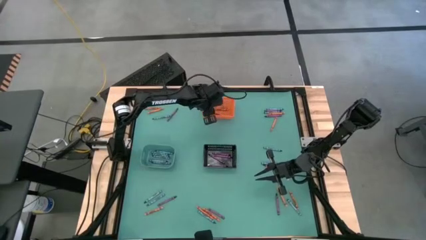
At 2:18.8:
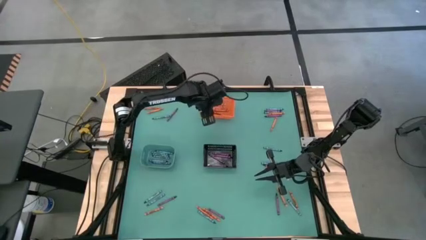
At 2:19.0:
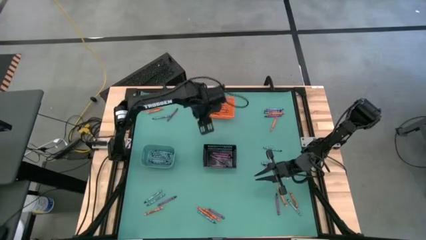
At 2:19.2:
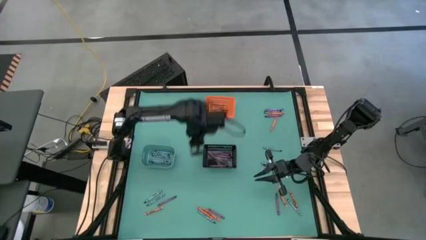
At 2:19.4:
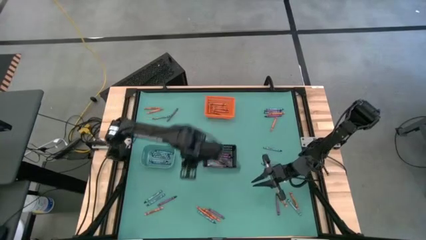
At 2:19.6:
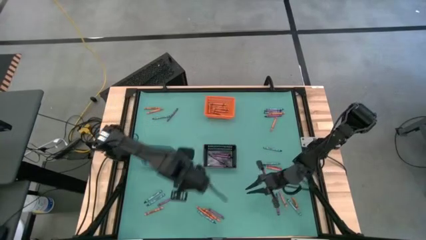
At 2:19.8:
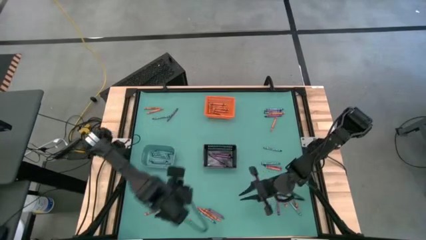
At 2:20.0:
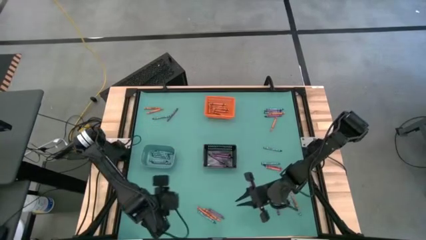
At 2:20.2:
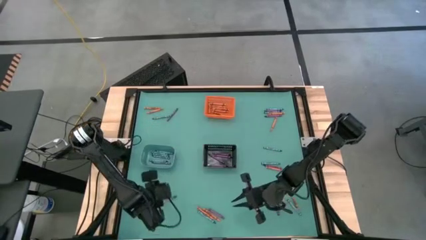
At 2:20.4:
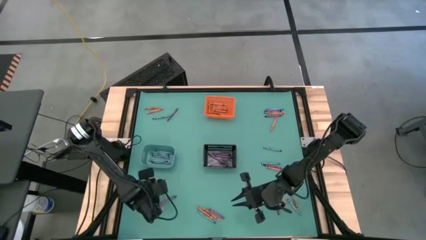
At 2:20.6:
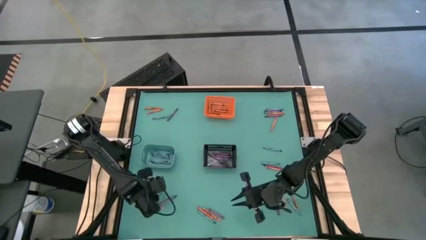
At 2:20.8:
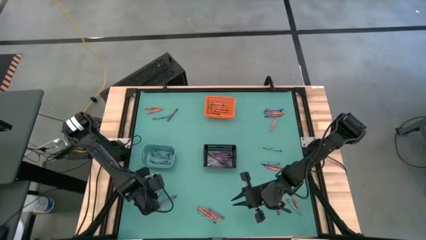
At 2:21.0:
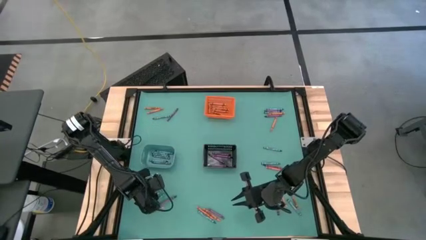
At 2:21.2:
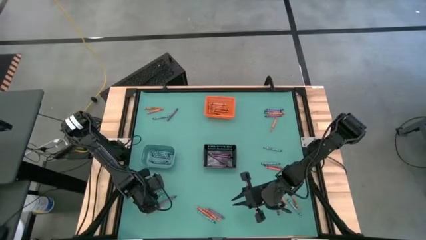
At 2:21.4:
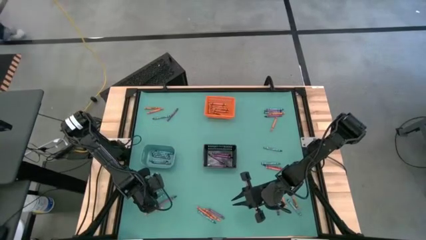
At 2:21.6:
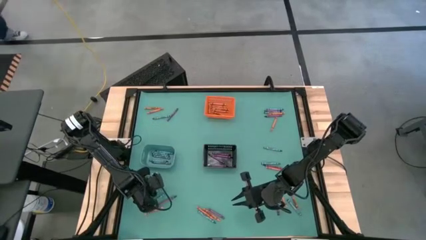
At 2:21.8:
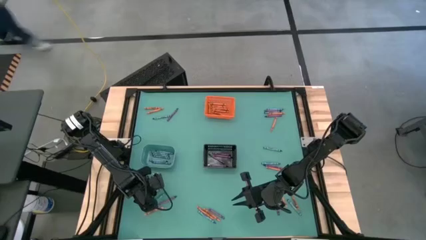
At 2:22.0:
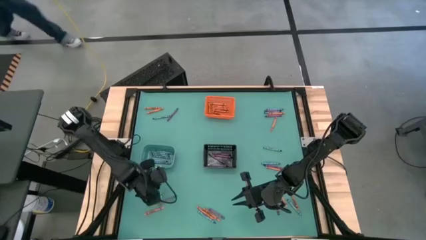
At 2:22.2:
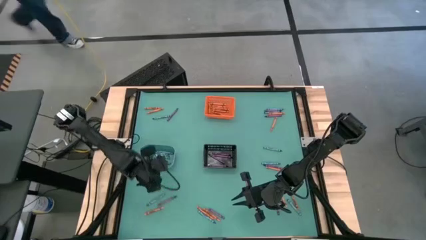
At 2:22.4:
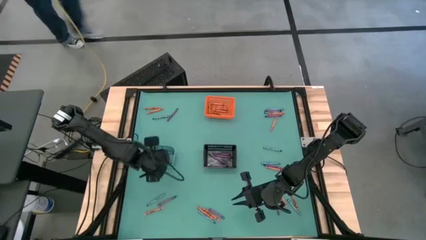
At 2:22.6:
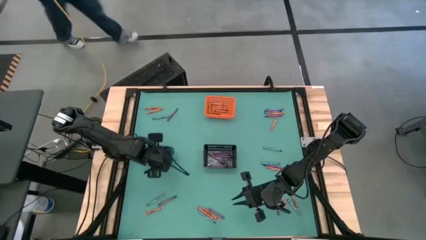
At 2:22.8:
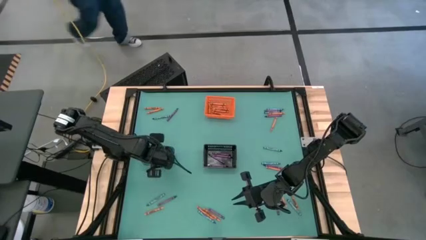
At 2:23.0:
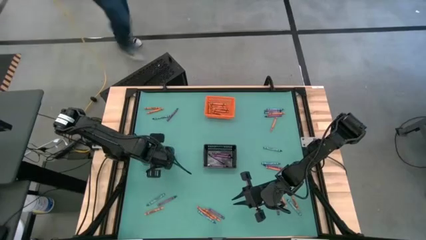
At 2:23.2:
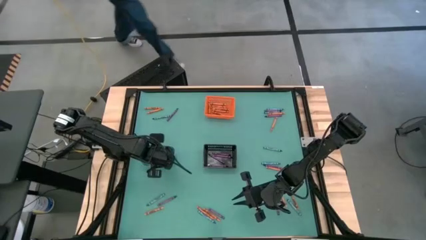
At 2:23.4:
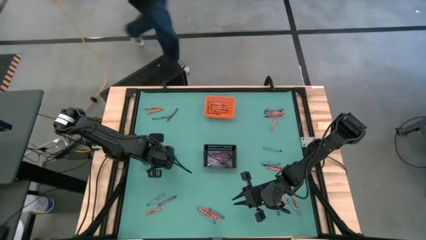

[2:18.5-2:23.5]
Task: Sort crayons
Put the blue crayon into the light blue bin

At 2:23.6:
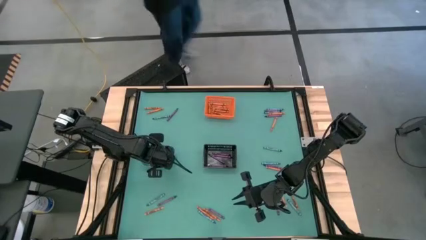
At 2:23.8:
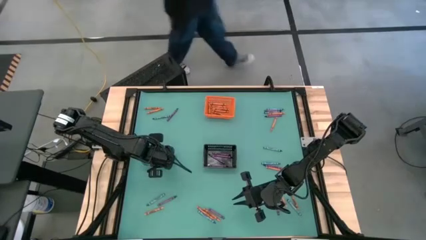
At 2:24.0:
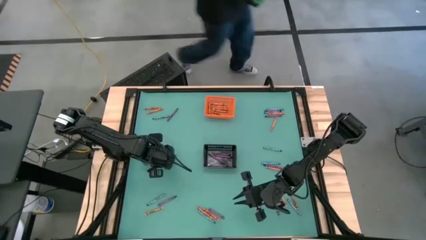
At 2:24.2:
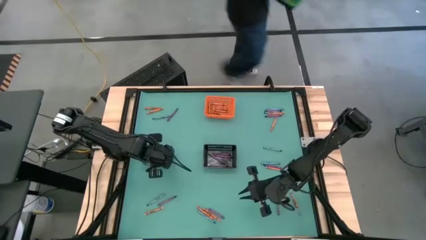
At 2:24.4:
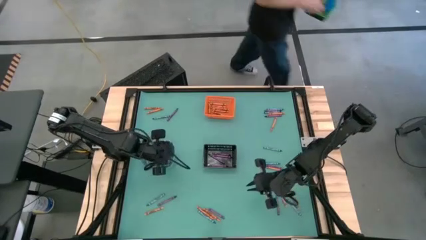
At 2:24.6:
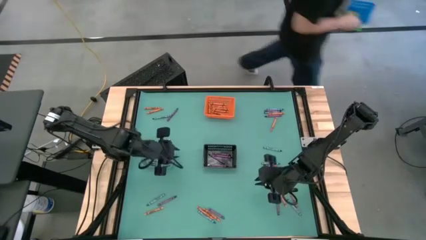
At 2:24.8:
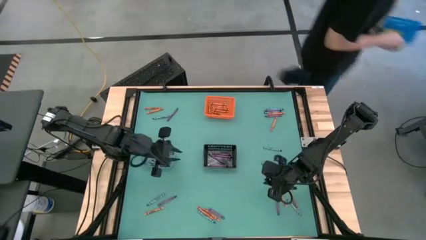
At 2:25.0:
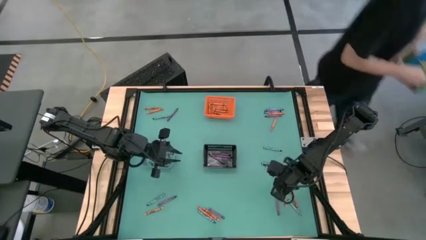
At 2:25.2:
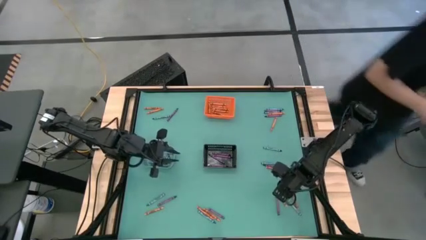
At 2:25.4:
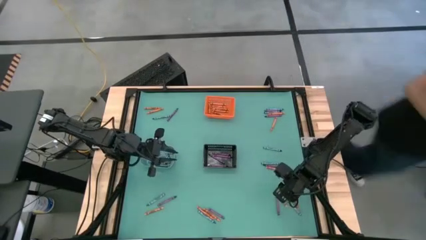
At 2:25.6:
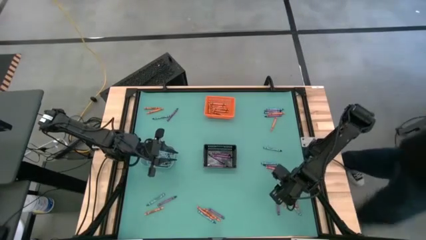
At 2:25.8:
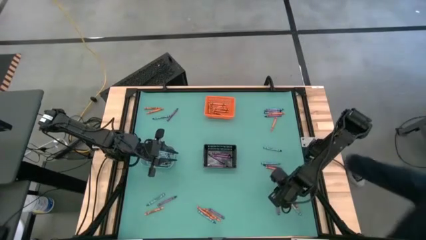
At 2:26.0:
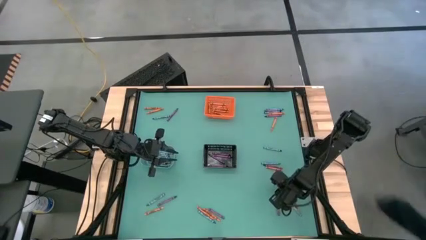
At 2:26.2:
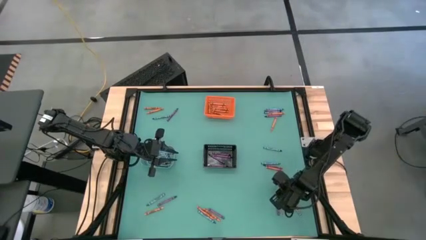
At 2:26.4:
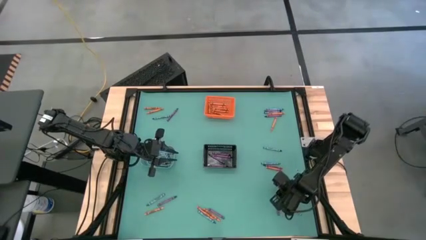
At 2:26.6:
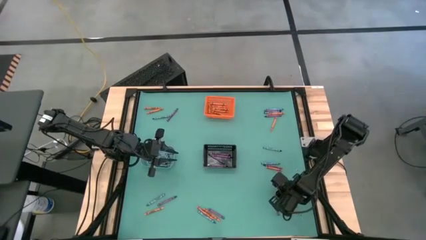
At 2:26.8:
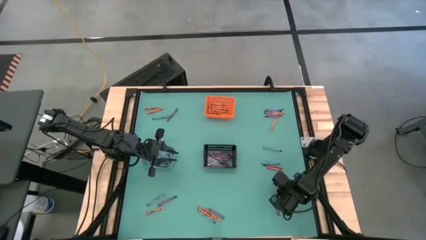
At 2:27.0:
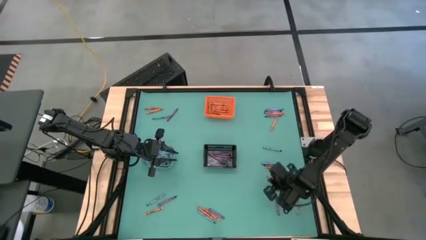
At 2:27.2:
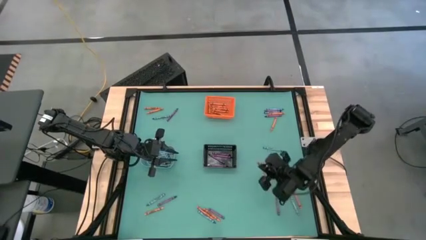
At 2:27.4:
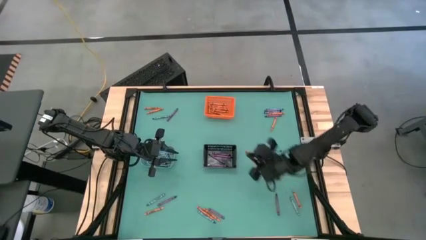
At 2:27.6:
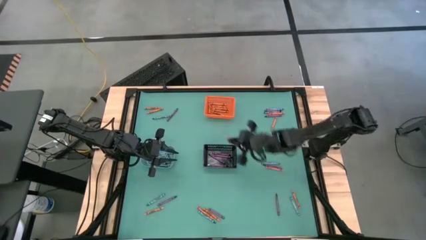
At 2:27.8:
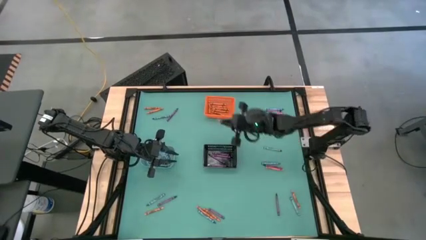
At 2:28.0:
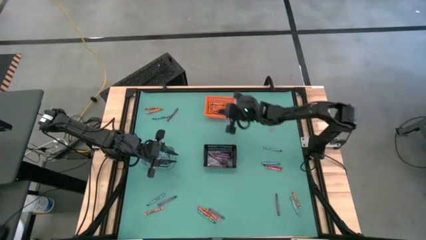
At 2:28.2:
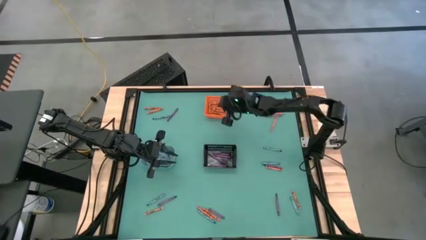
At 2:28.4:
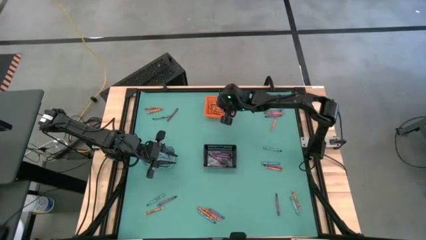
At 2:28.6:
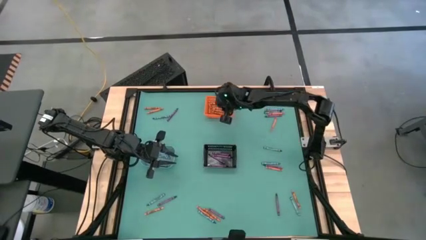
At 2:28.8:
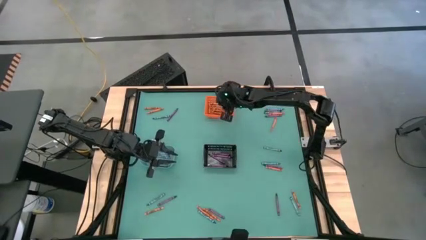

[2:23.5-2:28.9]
Put the orange crayon into the orange bin

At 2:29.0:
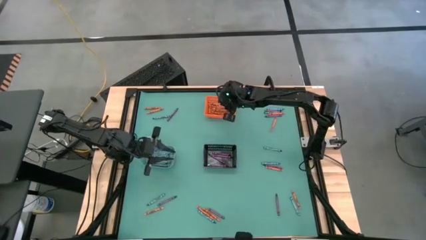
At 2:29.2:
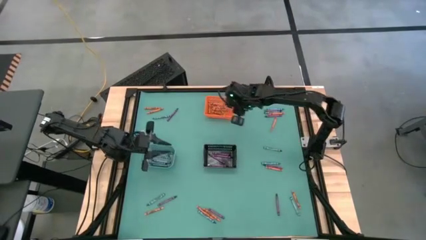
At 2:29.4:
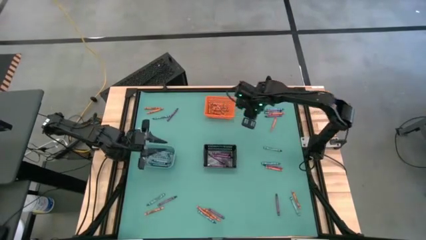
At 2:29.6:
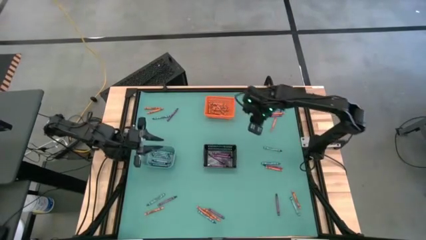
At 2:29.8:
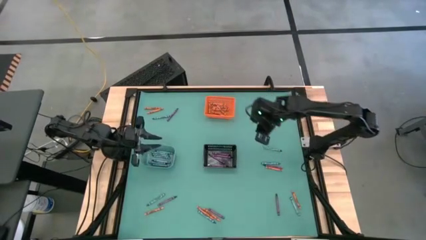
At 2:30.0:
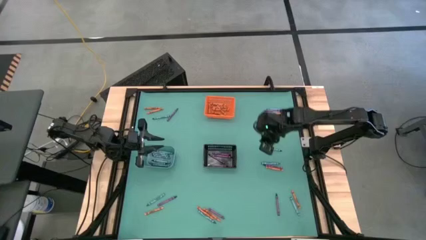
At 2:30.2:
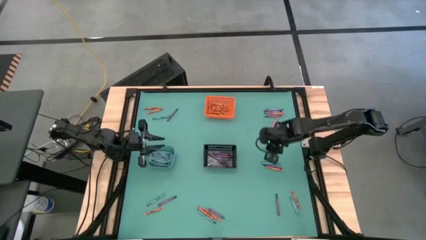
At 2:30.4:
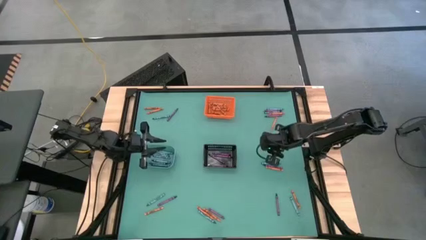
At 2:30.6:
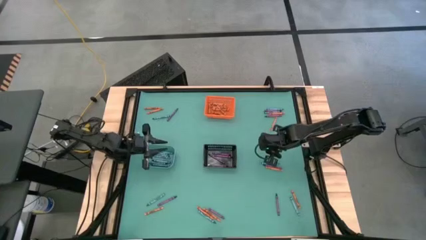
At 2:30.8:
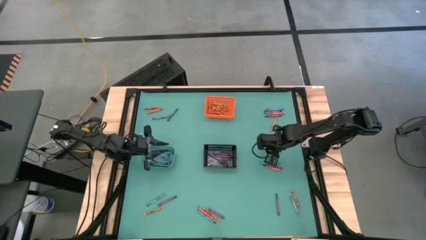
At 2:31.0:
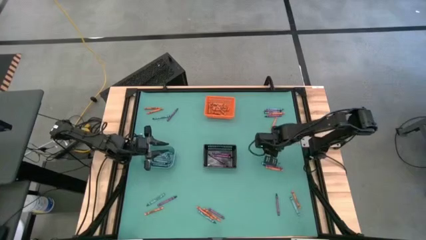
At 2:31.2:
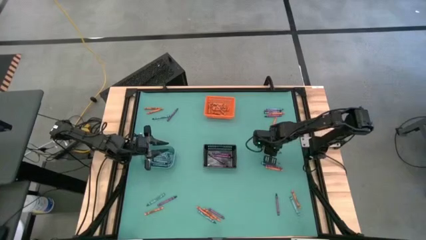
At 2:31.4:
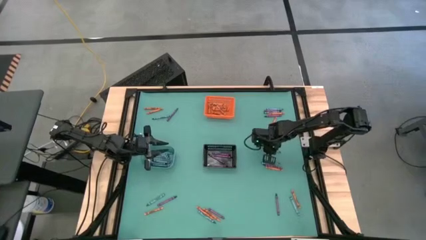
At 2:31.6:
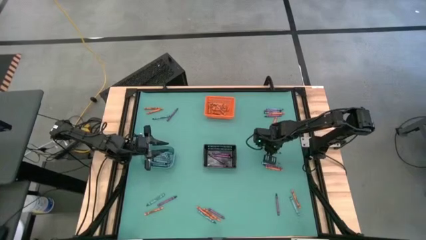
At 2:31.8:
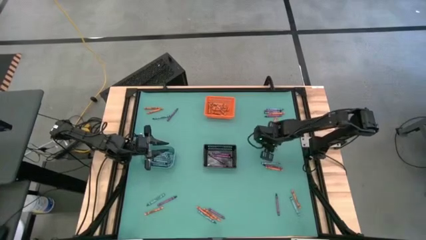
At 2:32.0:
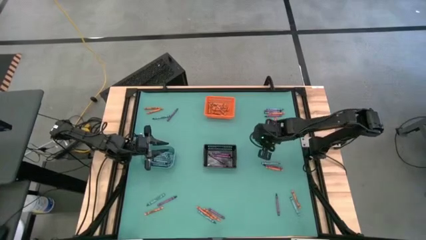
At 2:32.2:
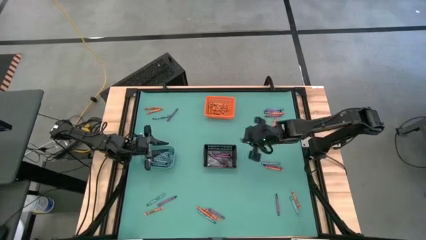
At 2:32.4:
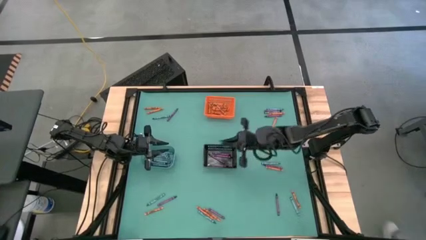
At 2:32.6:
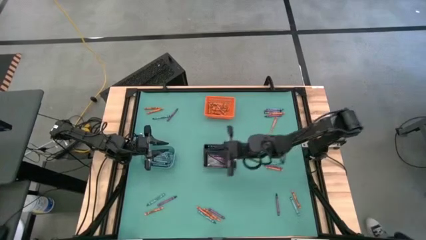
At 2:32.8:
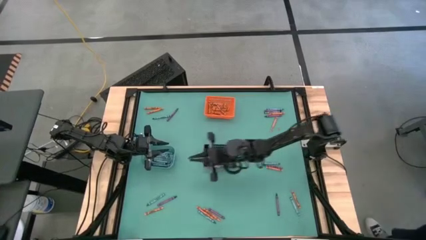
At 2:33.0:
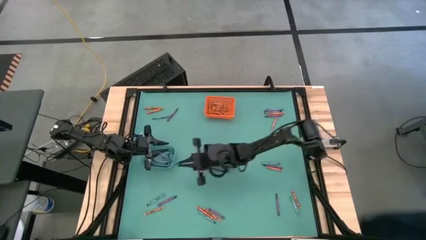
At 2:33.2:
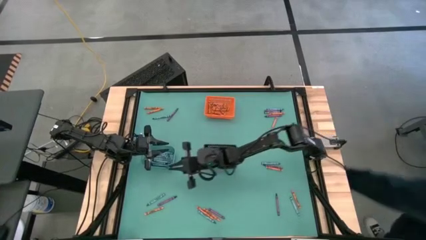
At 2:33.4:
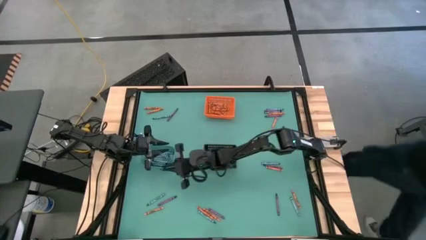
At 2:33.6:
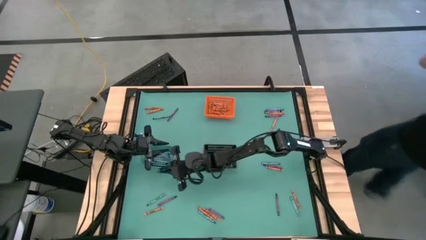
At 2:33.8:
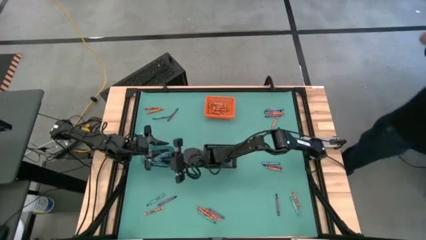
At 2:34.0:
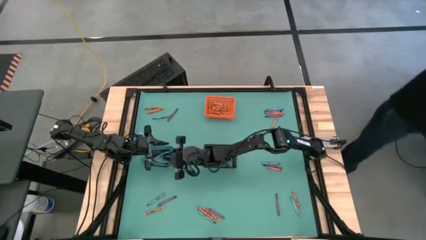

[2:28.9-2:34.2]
Put the blue crayon into the light blue bin

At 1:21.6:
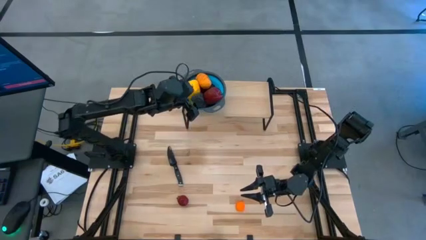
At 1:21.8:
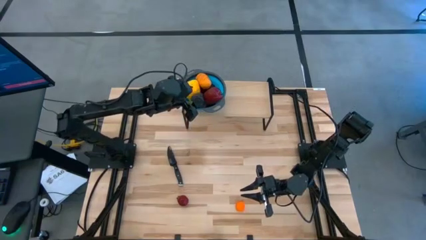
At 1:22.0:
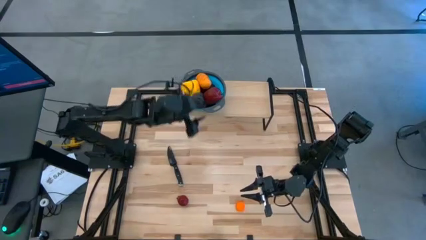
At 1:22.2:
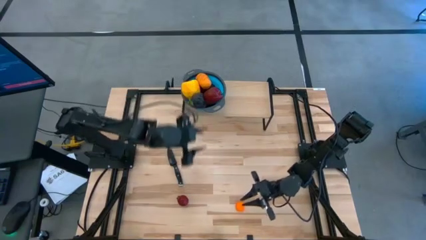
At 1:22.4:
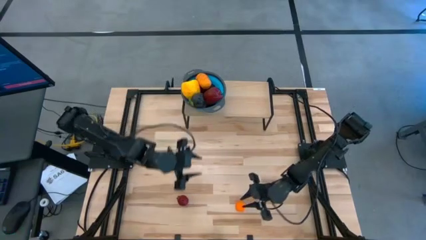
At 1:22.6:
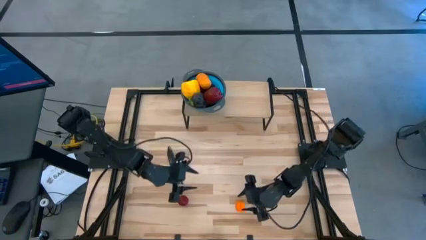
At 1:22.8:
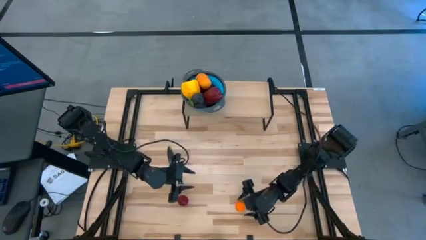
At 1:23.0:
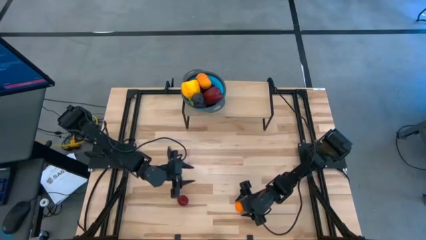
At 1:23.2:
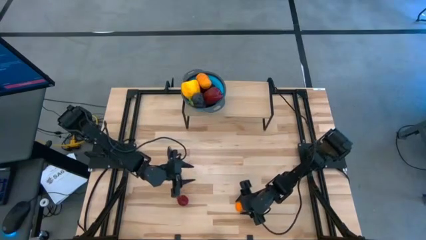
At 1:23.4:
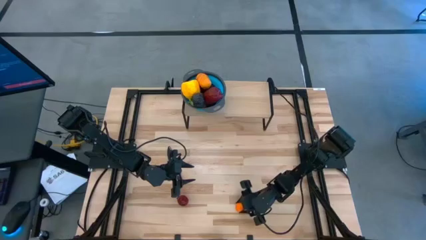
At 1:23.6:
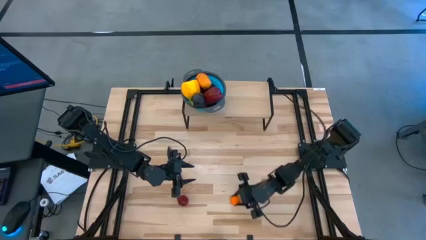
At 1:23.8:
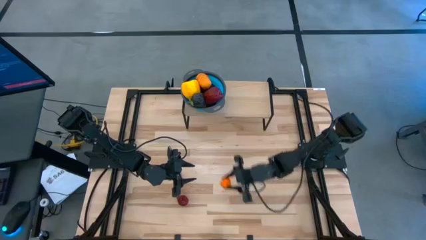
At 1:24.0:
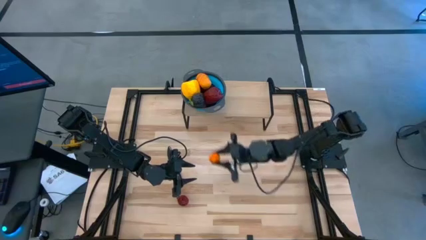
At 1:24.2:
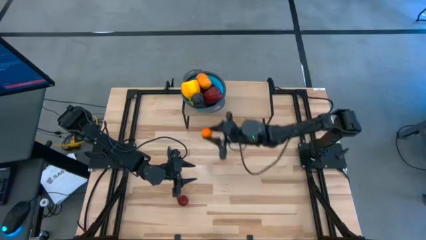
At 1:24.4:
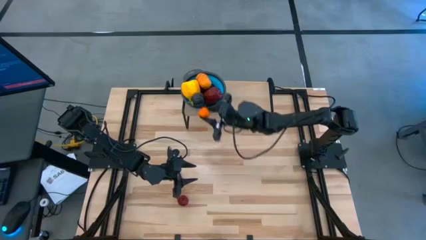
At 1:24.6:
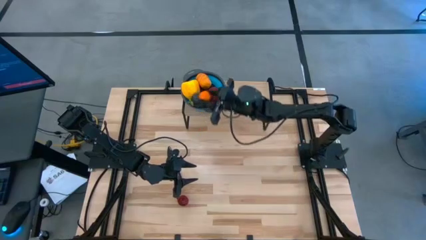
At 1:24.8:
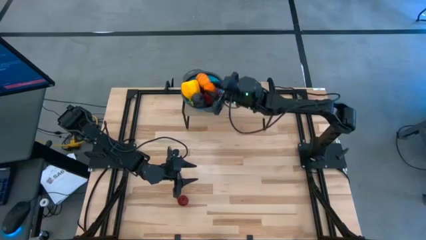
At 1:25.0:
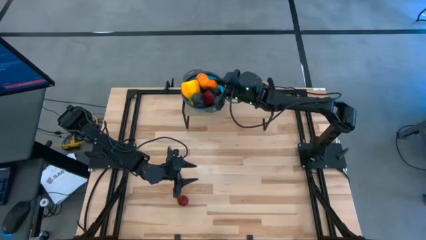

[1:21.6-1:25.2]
Task: Pick & Place Fruit
Put the orange into the blue strainer bowl on the shelf
